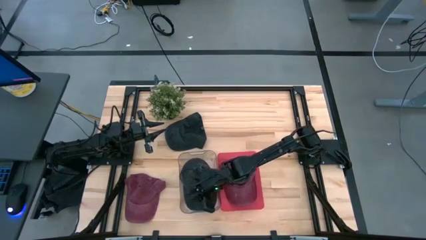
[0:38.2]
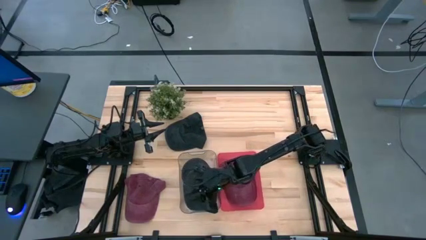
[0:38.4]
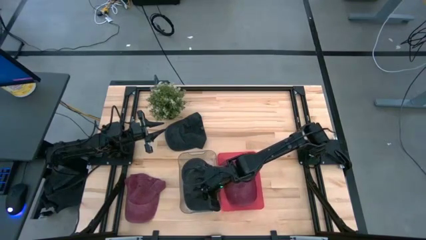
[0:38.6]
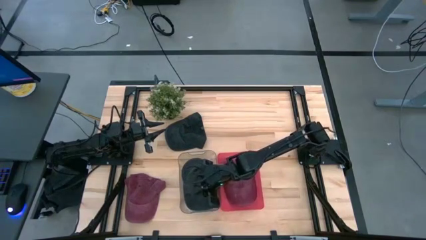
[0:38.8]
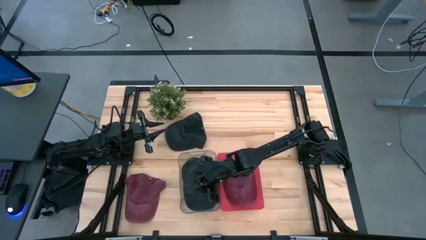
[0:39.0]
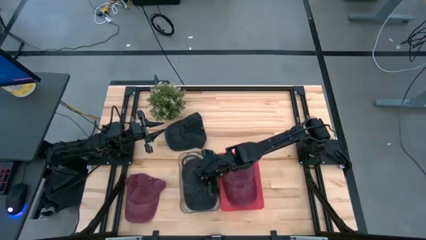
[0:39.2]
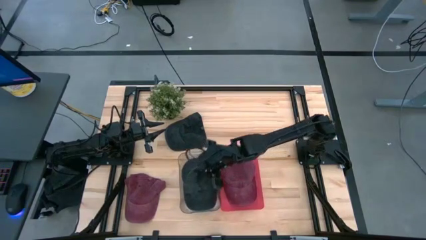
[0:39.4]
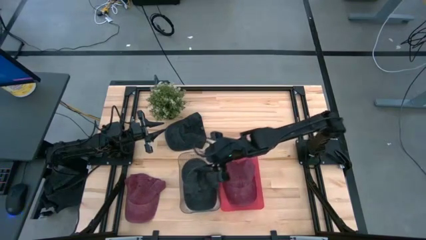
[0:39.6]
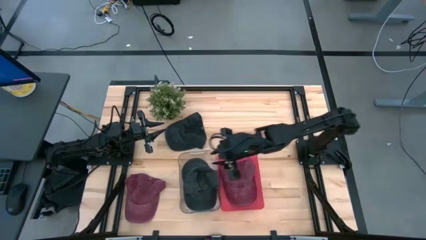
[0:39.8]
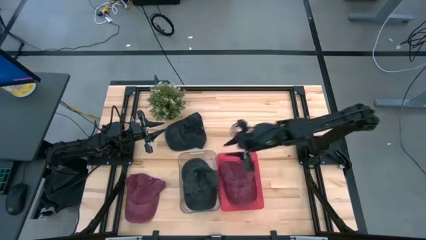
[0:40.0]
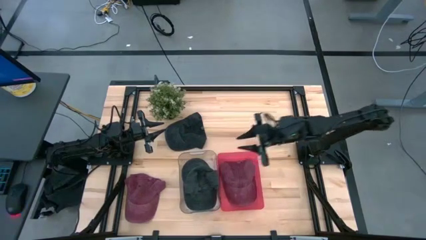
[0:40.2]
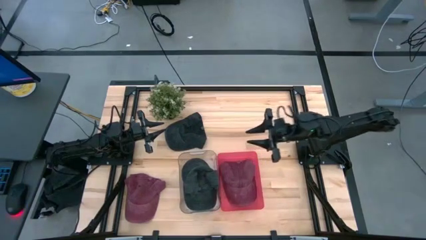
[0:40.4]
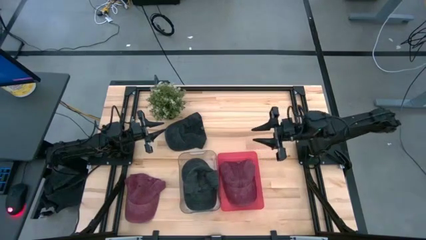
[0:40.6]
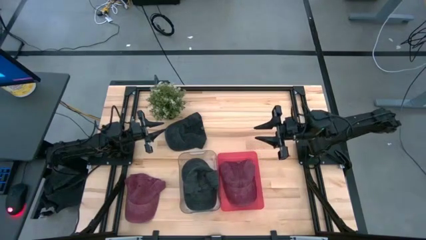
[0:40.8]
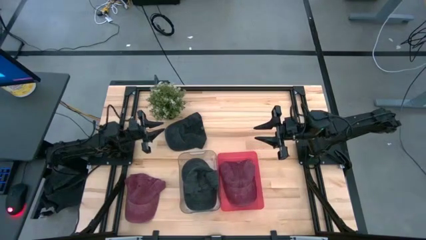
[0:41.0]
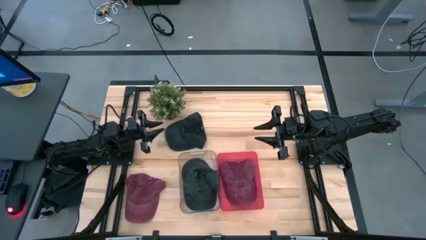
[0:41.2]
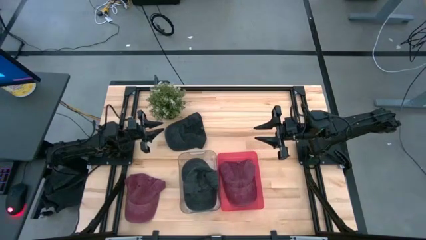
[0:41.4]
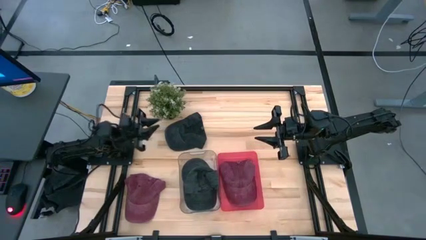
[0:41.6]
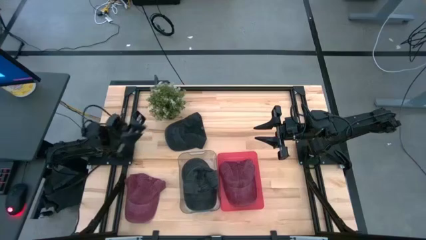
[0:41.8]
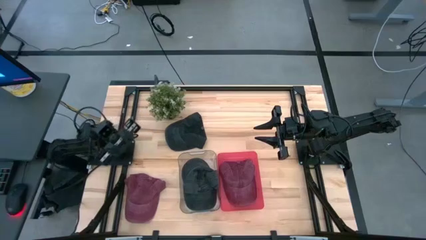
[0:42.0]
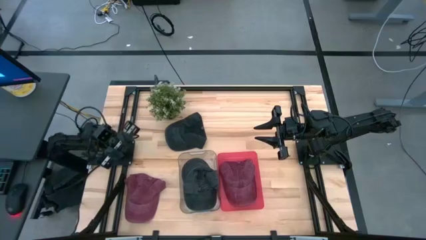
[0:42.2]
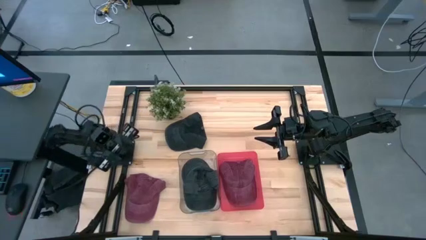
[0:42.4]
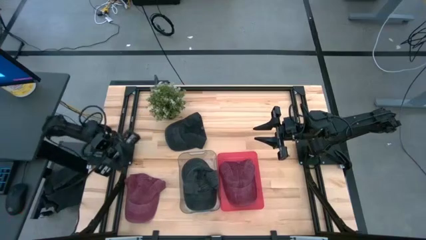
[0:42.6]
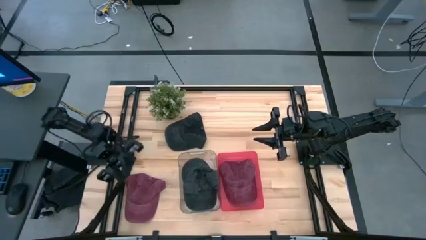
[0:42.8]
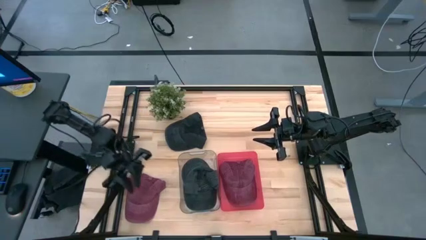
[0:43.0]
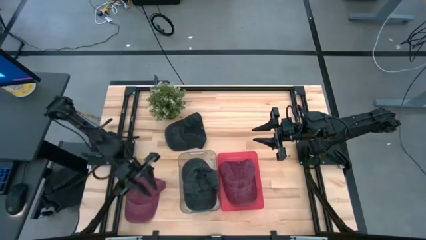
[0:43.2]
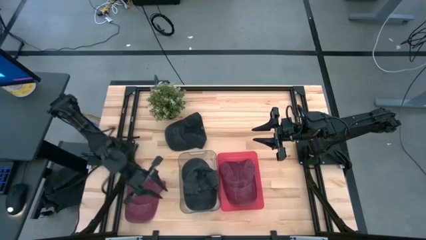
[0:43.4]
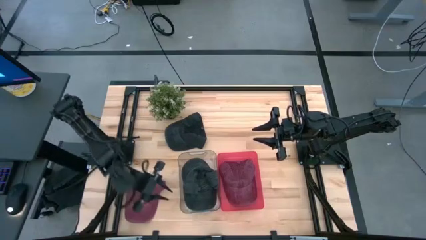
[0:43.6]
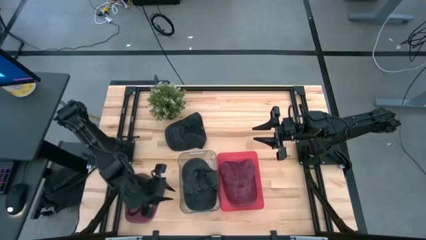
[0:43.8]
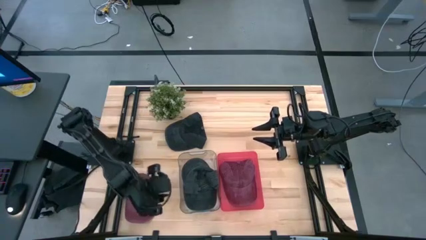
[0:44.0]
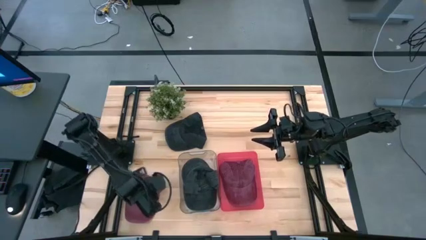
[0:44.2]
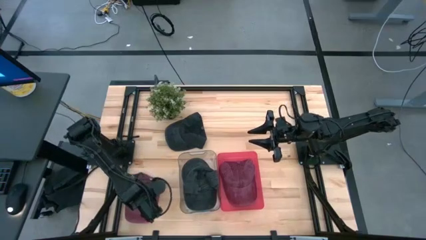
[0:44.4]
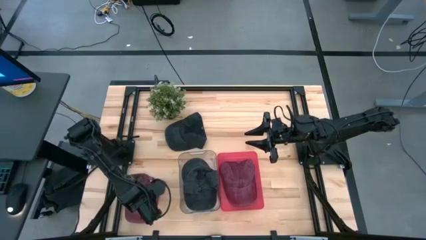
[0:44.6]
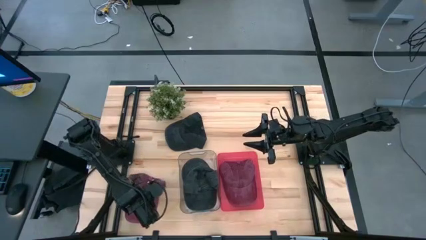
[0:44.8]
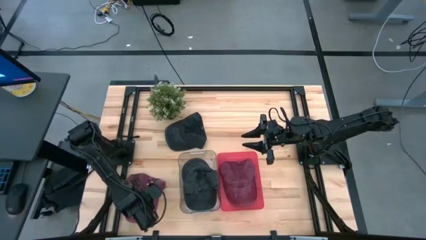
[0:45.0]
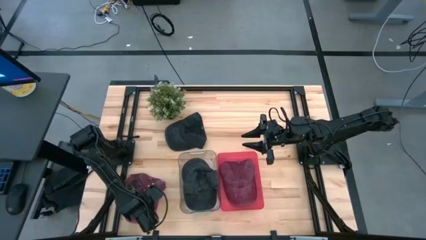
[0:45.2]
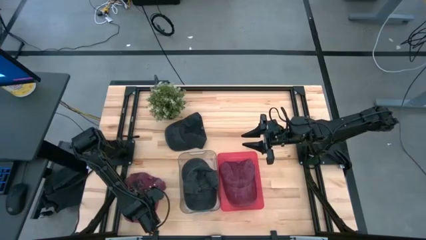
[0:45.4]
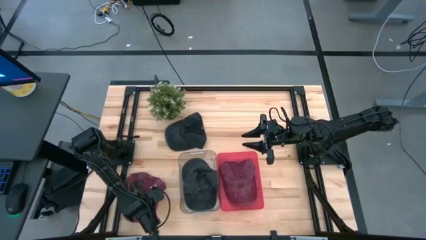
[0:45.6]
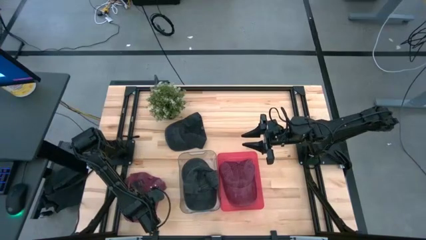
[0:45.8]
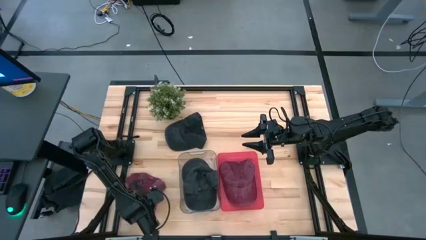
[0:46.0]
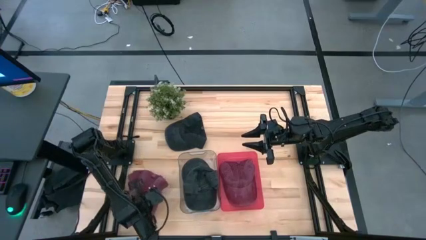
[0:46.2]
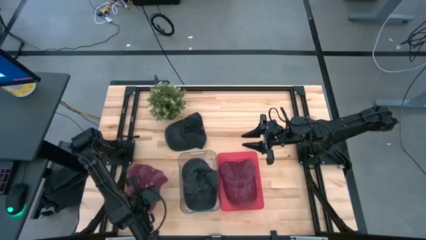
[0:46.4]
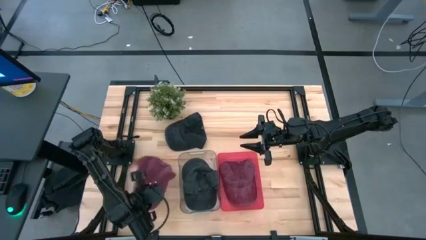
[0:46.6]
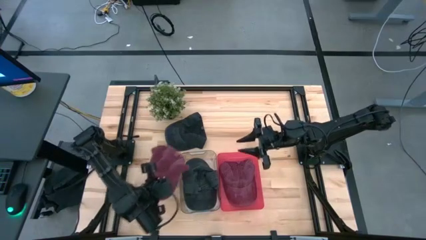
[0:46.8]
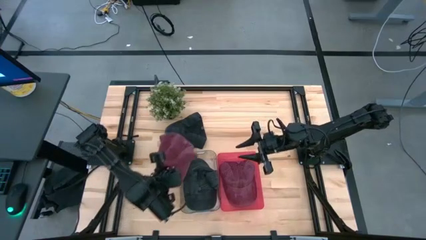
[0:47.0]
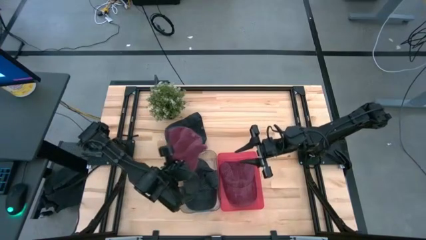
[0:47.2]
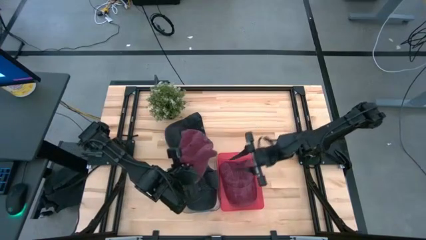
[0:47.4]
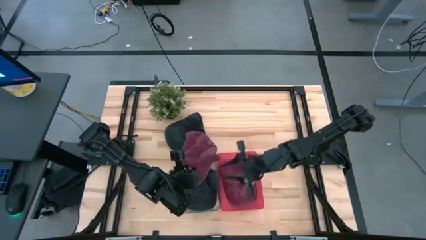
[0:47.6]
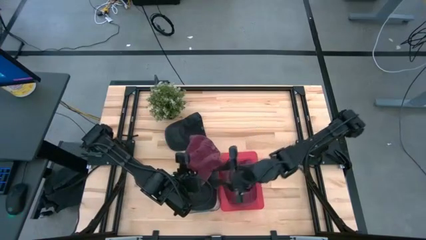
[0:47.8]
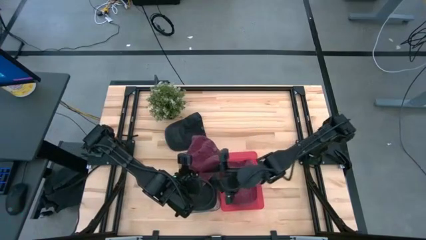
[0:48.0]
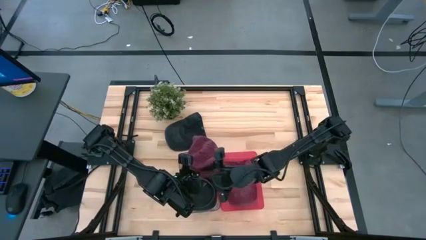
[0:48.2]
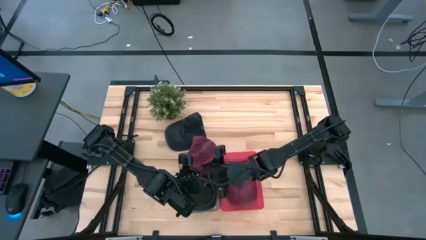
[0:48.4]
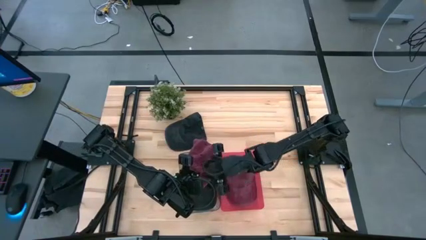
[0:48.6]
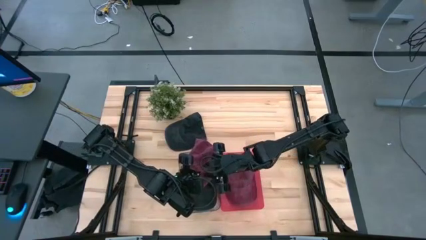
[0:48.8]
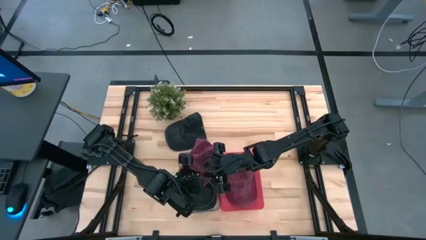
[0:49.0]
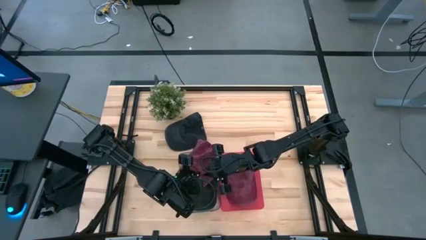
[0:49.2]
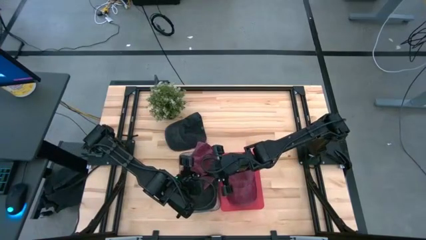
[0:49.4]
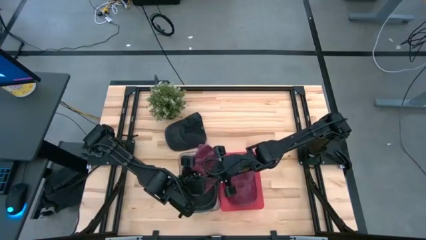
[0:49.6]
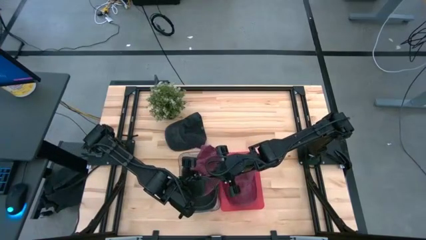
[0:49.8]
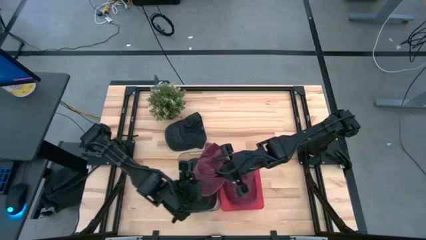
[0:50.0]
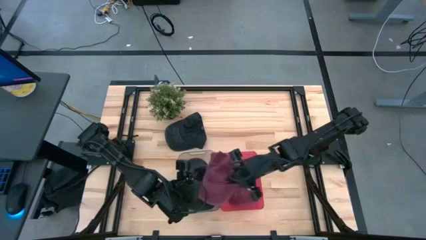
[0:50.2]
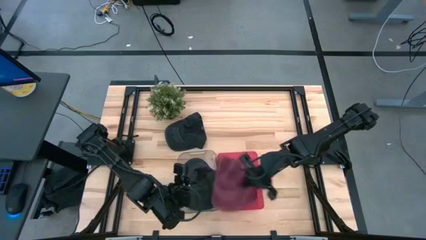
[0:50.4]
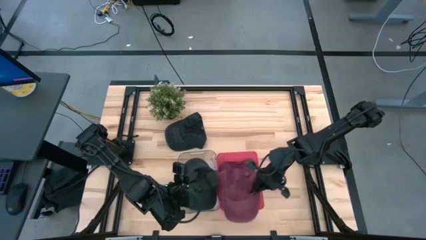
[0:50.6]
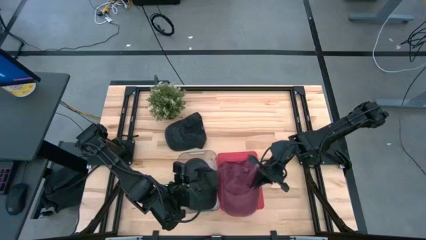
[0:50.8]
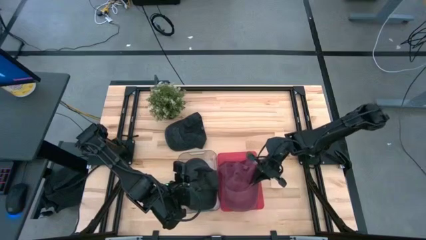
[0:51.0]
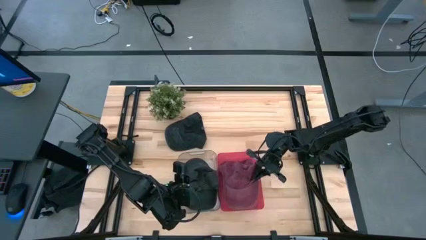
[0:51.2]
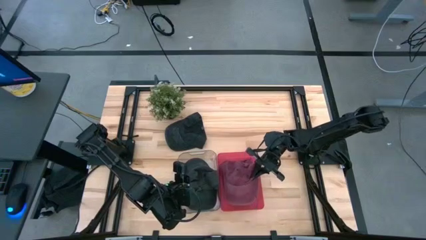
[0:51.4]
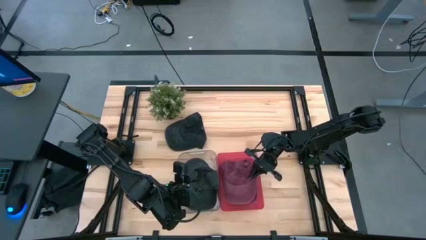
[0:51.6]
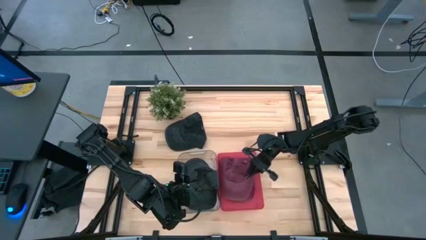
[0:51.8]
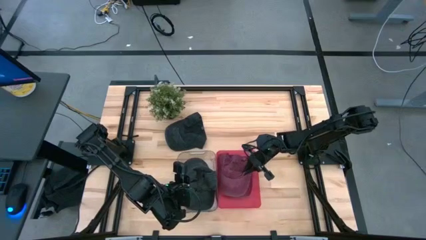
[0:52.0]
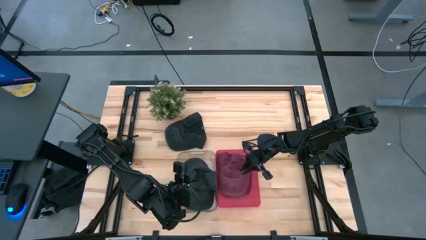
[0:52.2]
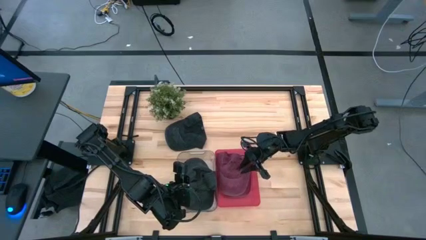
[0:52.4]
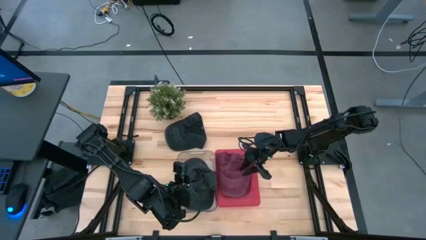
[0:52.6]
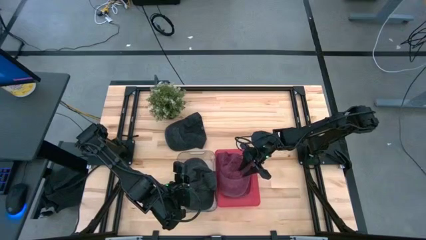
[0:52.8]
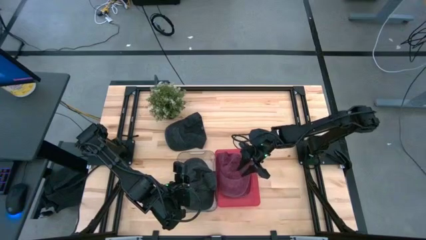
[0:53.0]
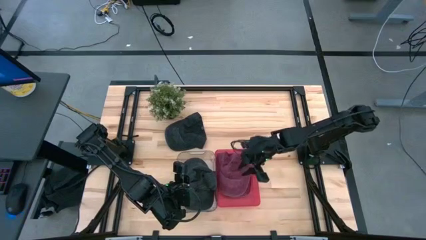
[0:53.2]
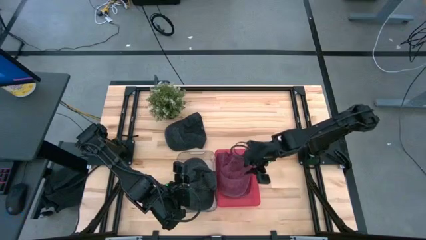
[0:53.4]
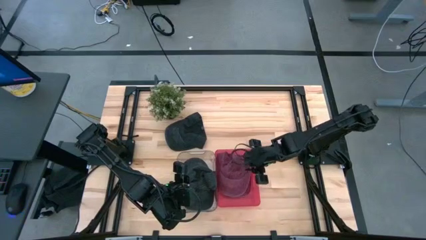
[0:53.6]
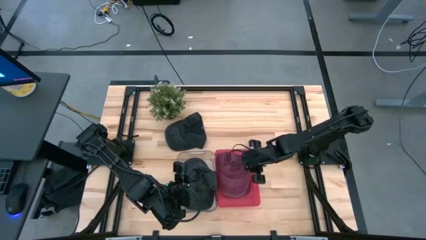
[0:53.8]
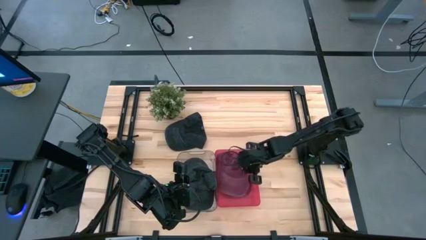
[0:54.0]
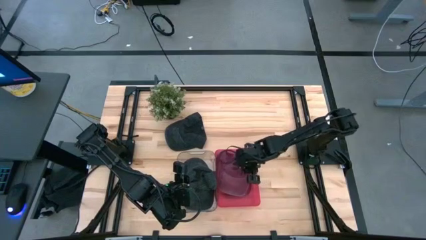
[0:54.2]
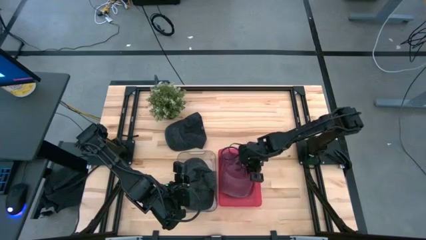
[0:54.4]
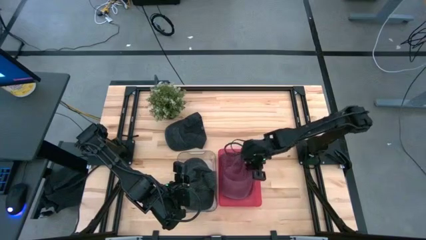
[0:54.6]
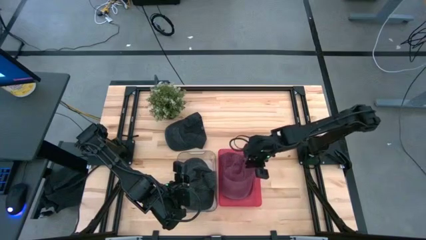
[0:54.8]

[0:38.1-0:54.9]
Task: Pick & Place hat
Put the red cap into the red bin
